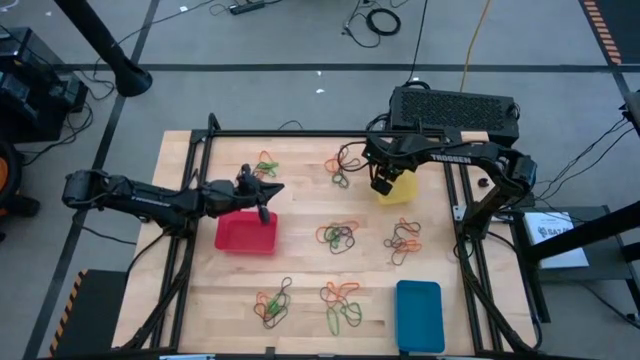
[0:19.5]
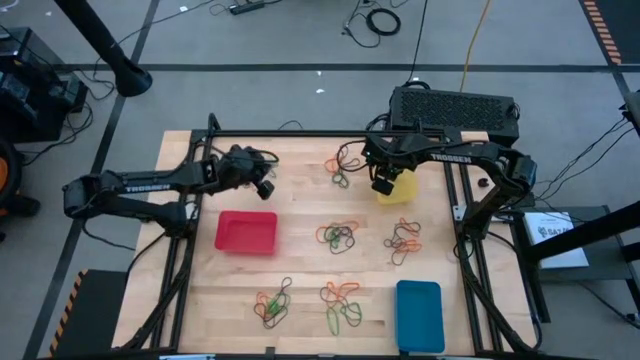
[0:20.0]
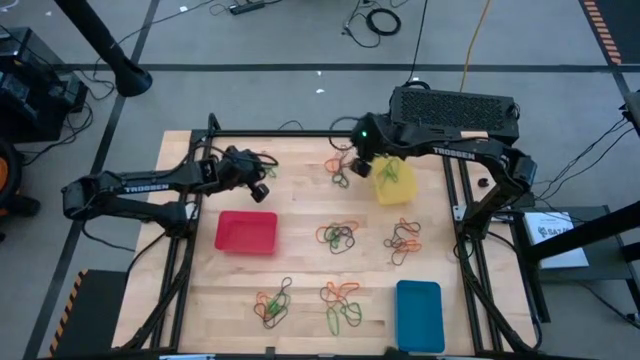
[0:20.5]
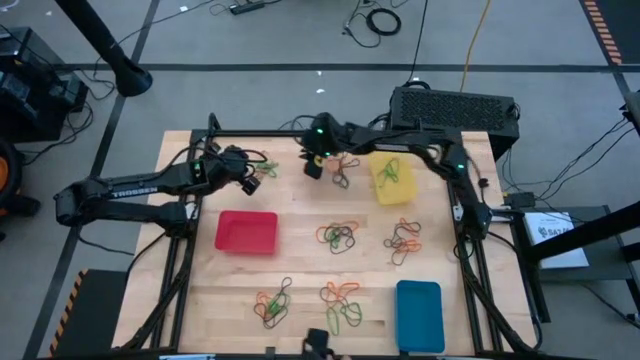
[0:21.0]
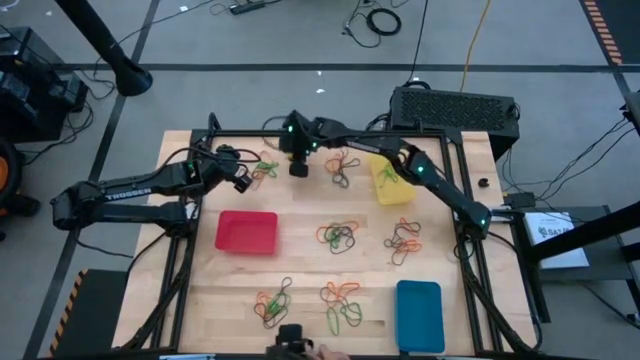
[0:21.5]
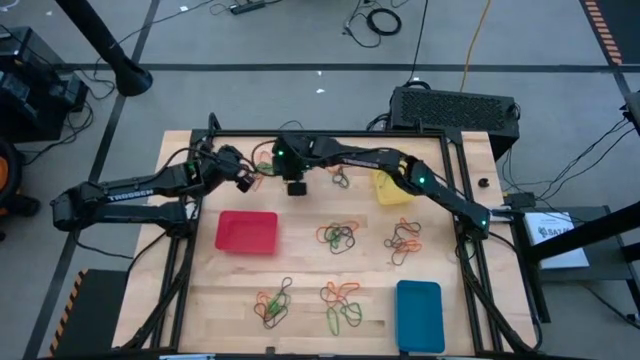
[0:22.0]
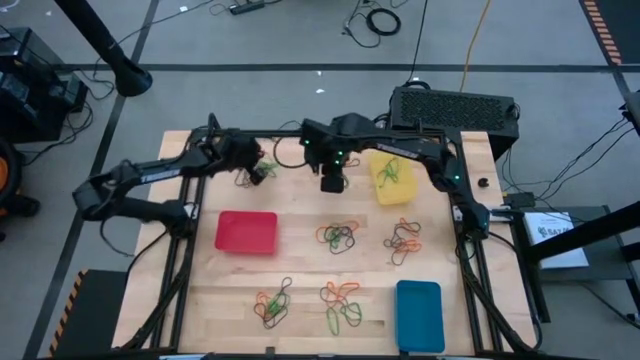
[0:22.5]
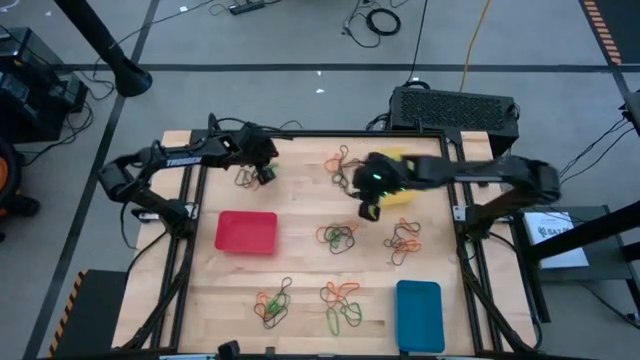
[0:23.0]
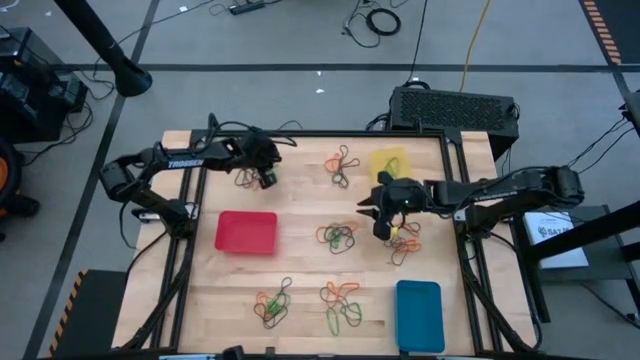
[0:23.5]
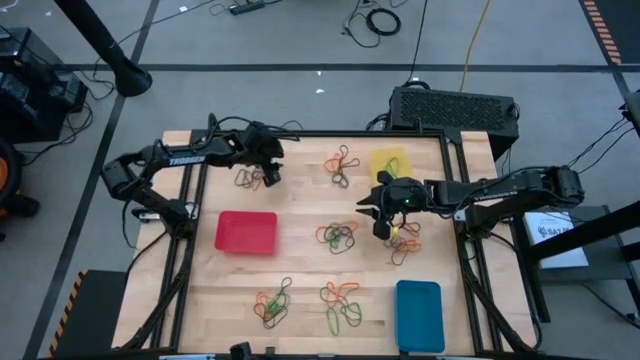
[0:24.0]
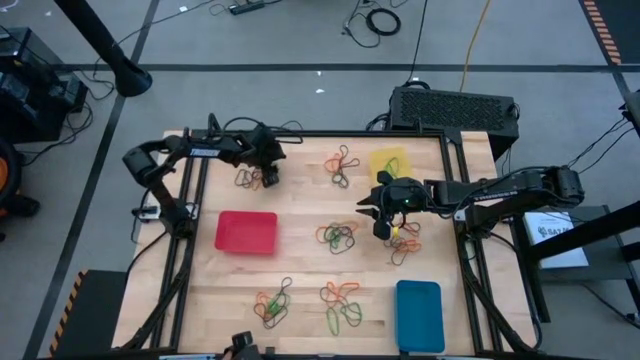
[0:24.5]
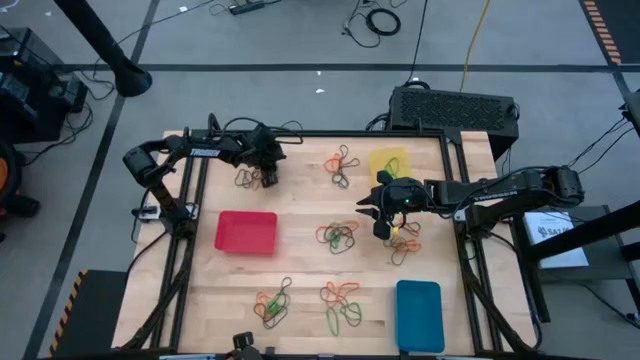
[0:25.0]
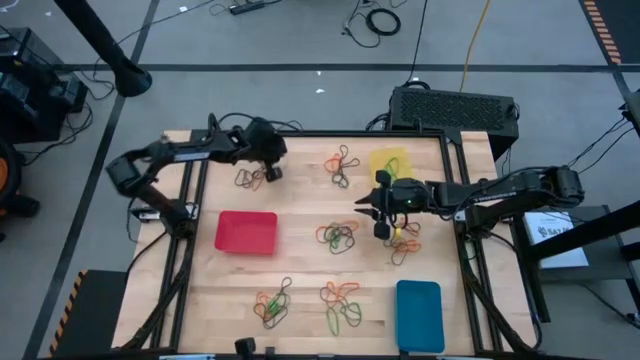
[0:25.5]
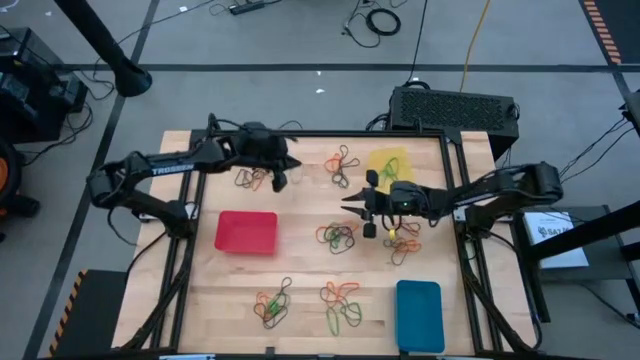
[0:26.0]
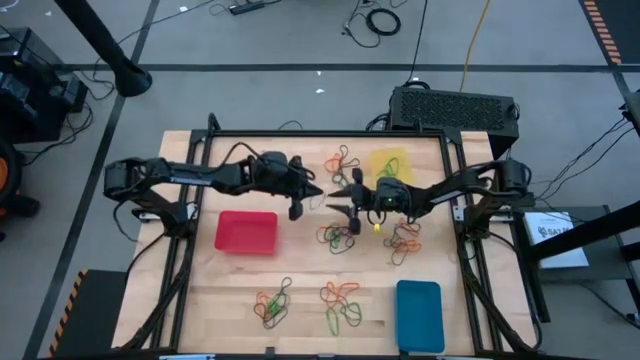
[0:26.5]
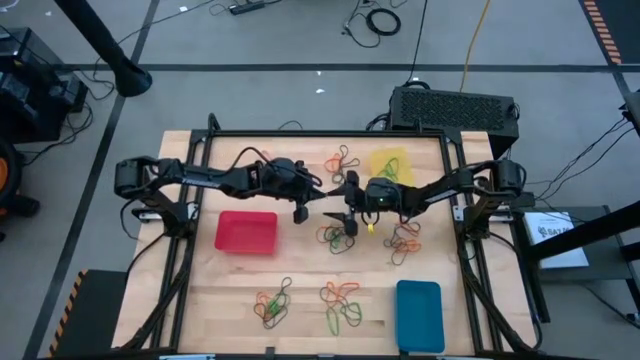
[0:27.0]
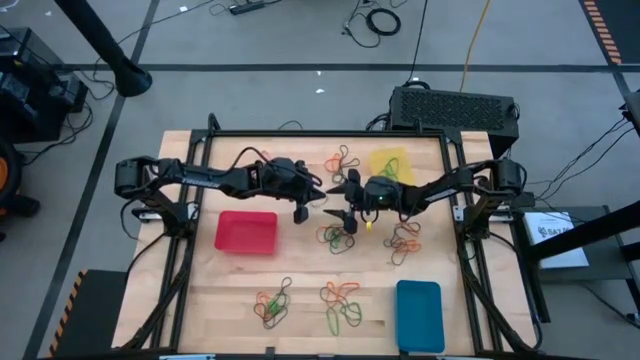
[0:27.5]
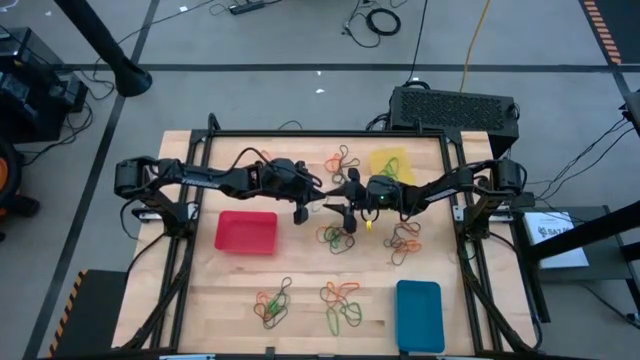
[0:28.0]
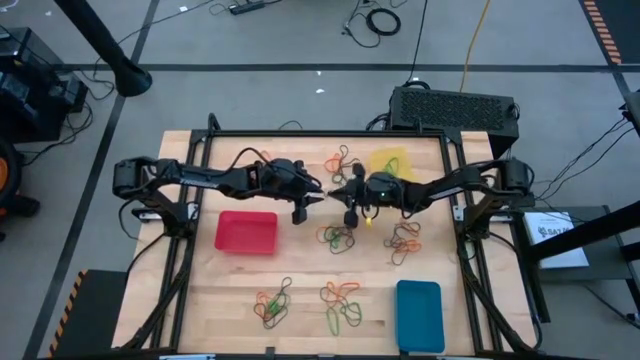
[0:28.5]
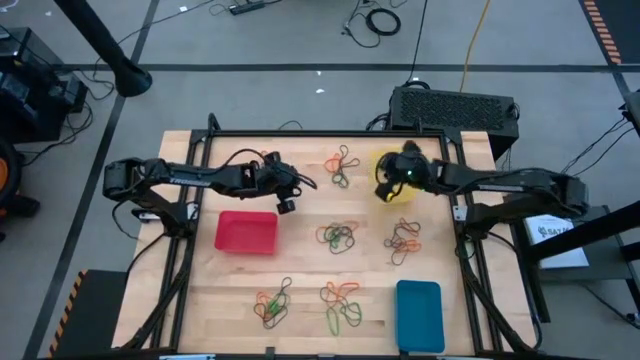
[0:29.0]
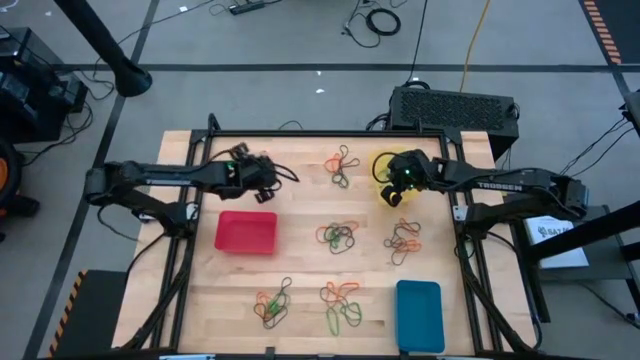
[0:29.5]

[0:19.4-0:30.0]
Task: Sort rubber bands into baskets
Put the green rubber band into the yellow bin

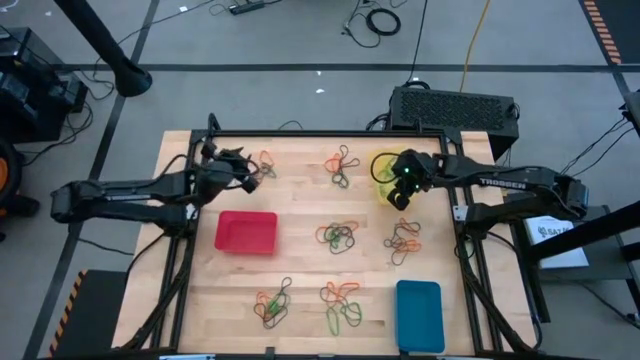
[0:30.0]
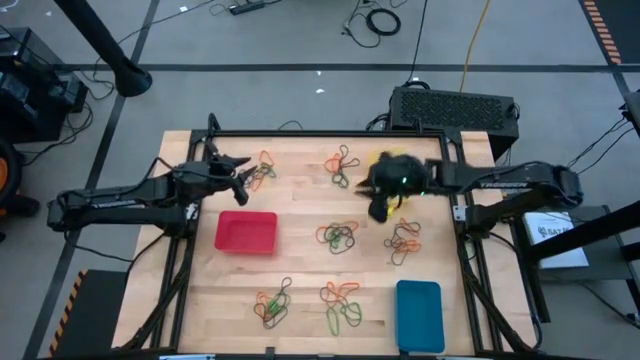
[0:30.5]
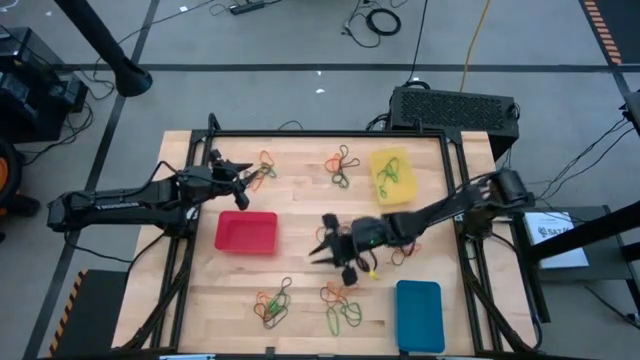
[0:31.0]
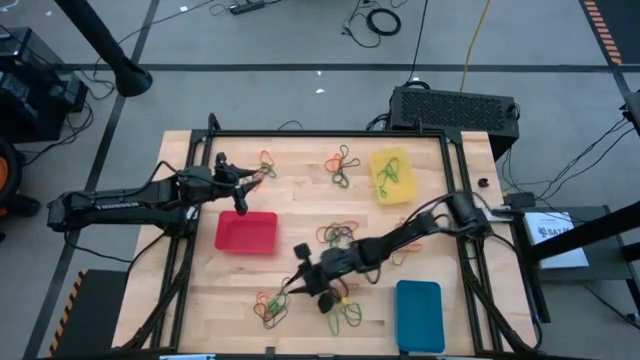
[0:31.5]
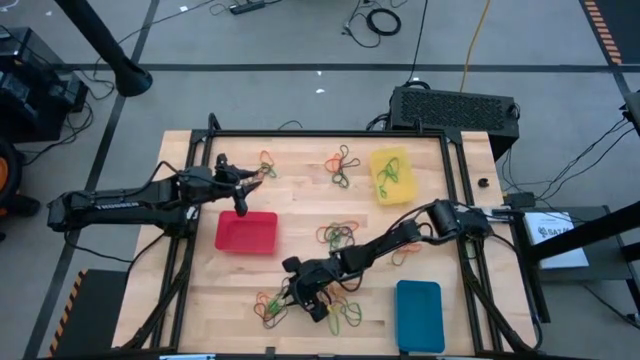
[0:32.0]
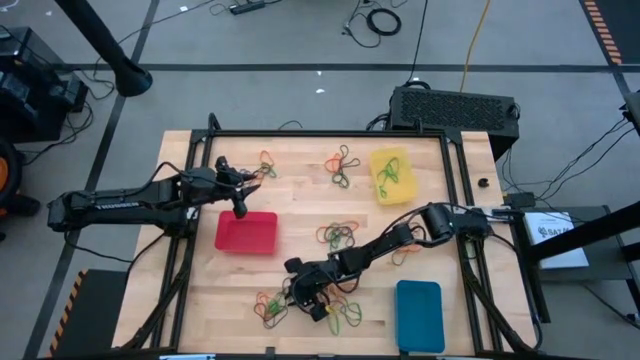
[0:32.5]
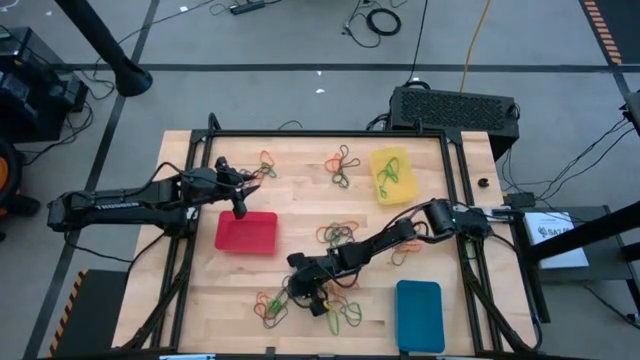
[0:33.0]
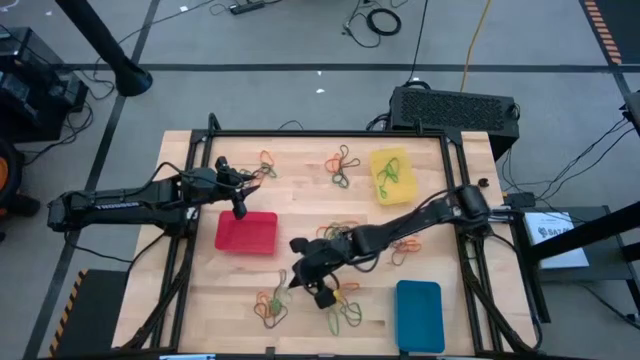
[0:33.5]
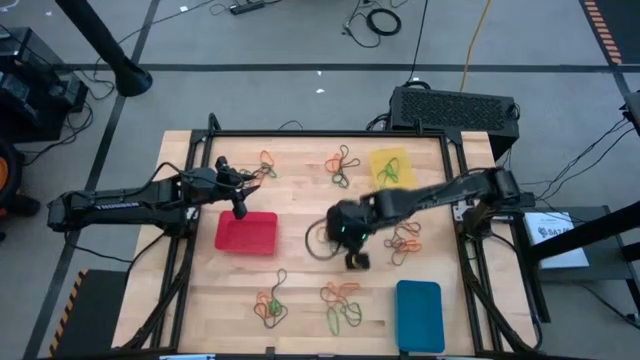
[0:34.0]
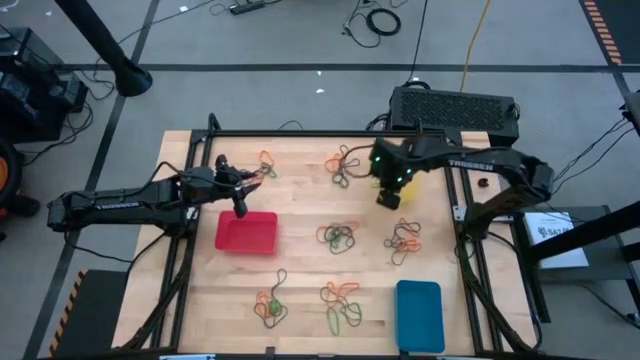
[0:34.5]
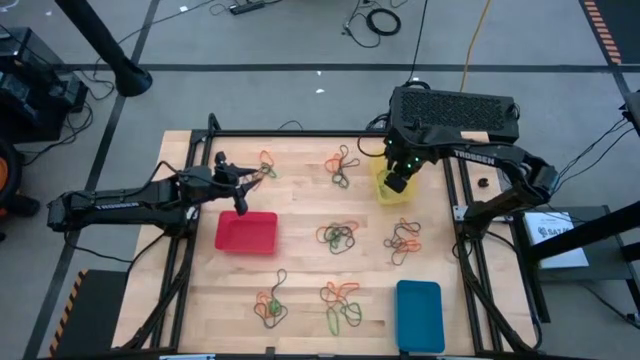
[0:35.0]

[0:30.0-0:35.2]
Put the green rubber band into the yellow bin

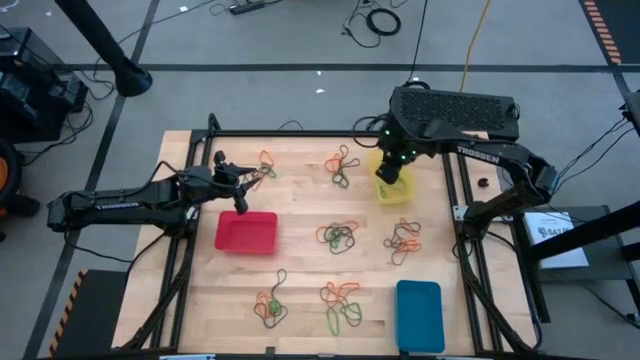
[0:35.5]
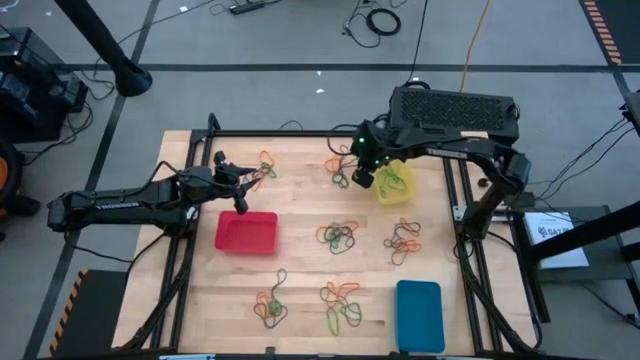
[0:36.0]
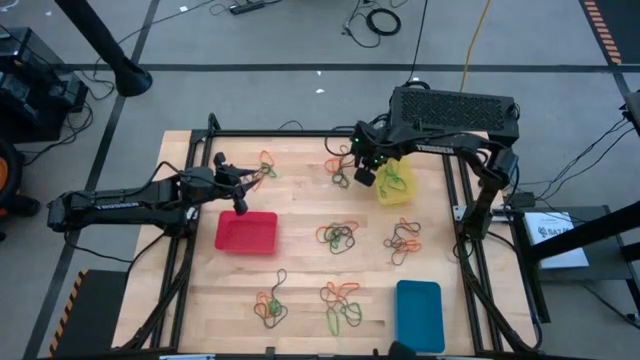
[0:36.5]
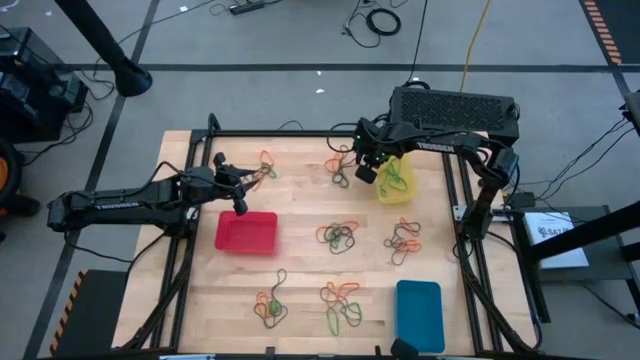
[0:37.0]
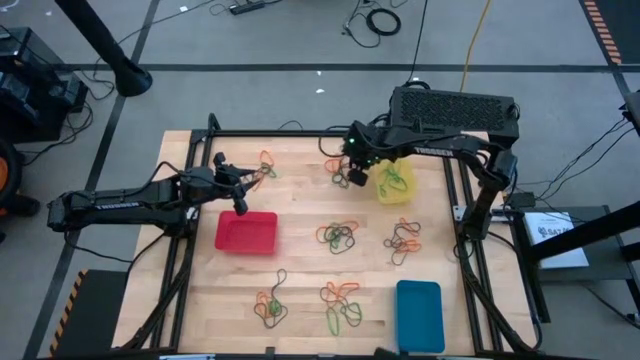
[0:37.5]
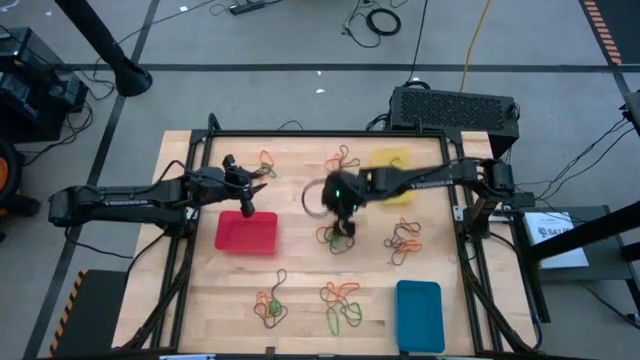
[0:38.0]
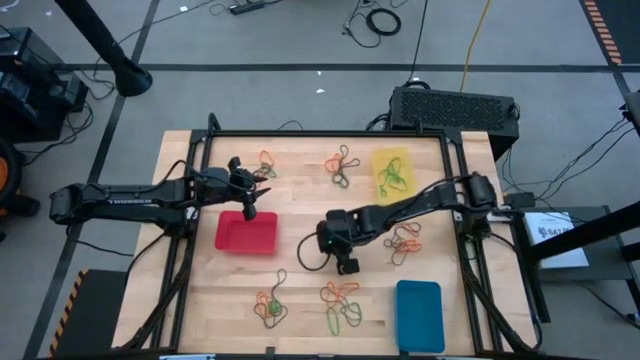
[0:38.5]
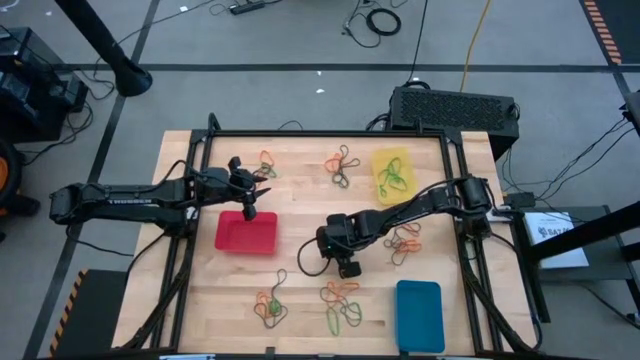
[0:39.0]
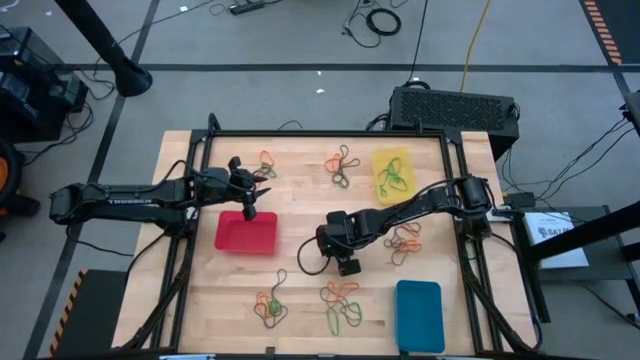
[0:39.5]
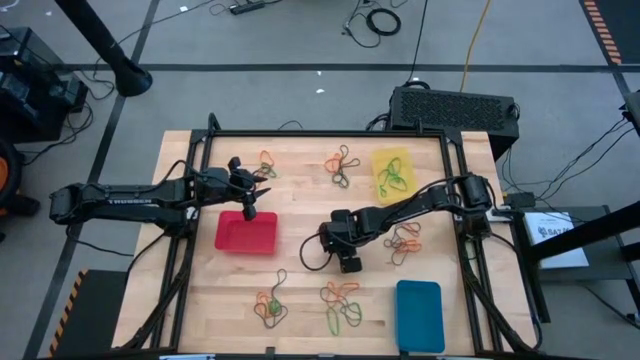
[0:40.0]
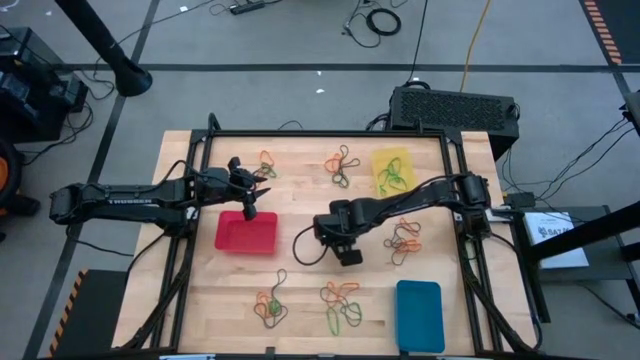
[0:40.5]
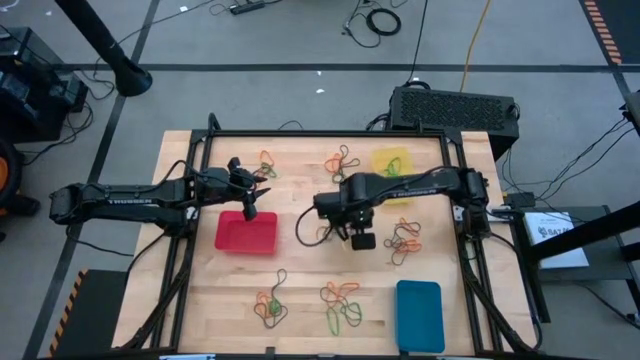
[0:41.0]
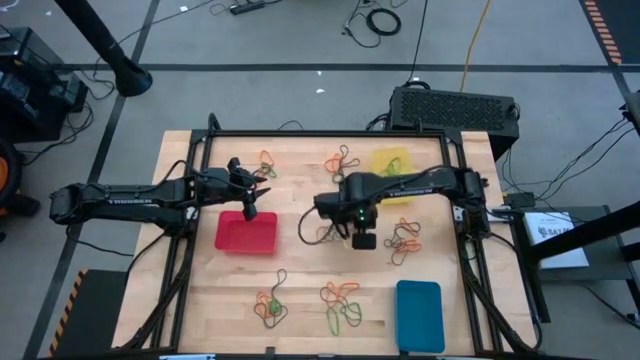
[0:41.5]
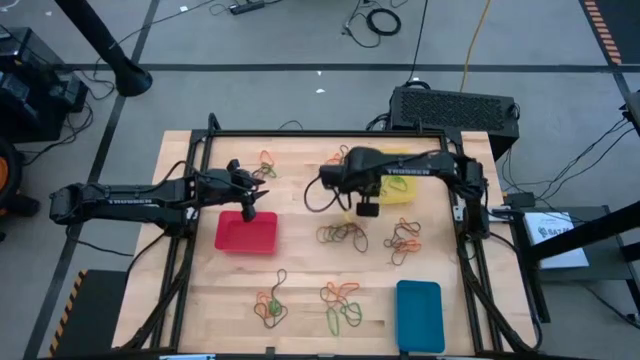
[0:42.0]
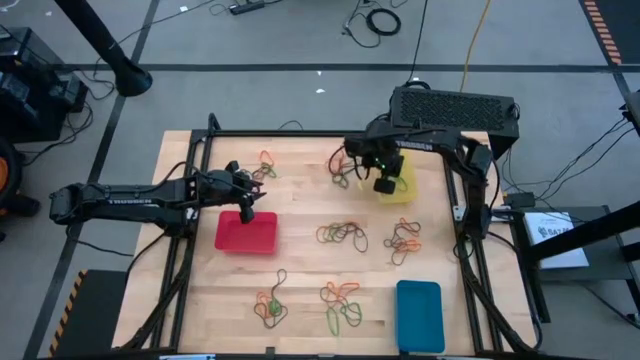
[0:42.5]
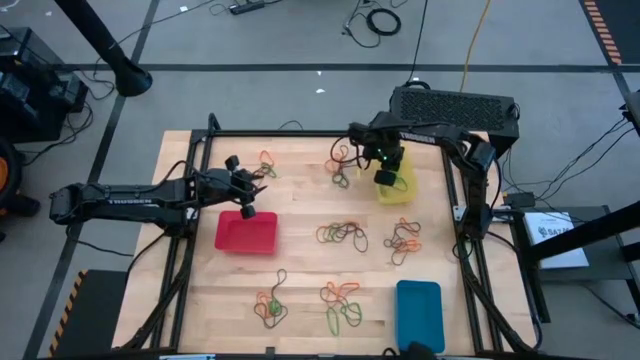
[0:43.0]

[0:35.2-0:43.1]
Put the green rubber band into the yellow bin
